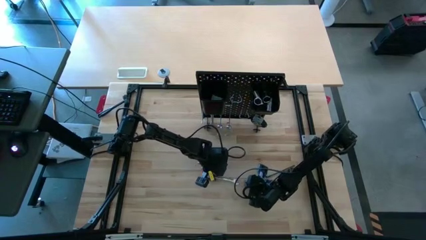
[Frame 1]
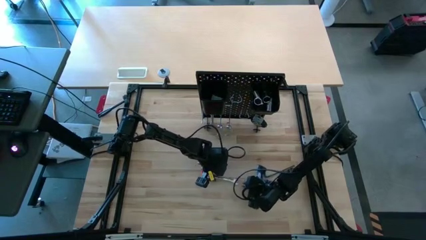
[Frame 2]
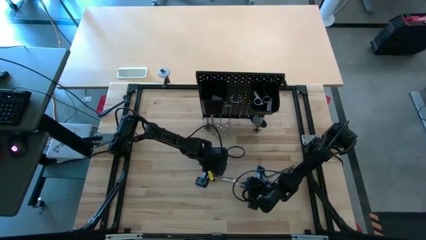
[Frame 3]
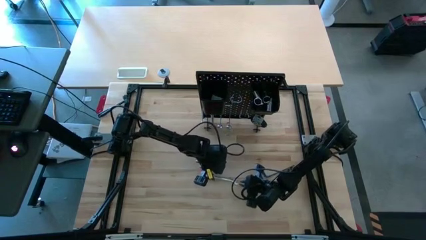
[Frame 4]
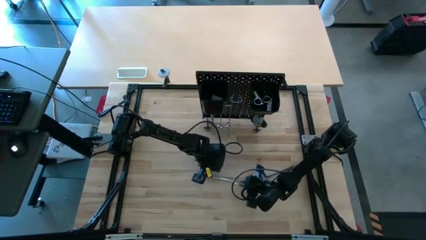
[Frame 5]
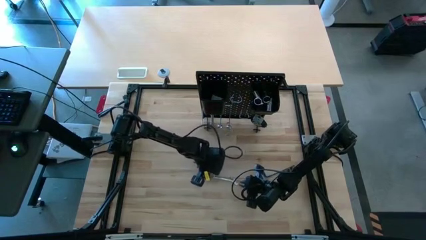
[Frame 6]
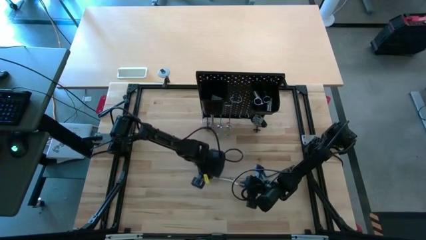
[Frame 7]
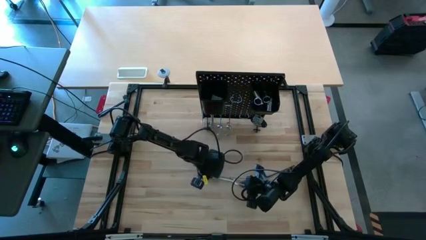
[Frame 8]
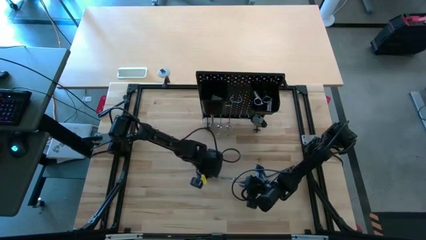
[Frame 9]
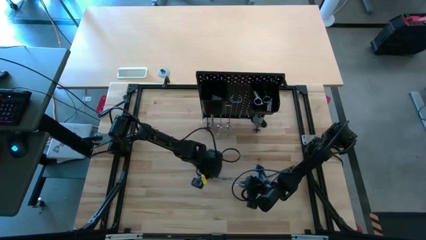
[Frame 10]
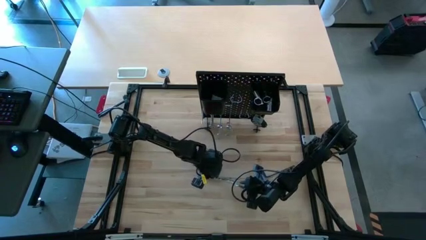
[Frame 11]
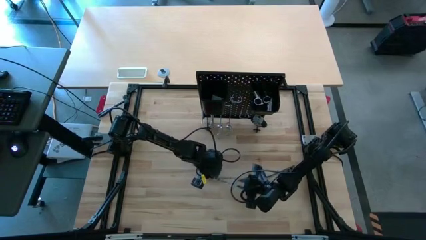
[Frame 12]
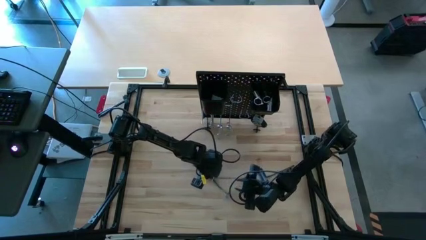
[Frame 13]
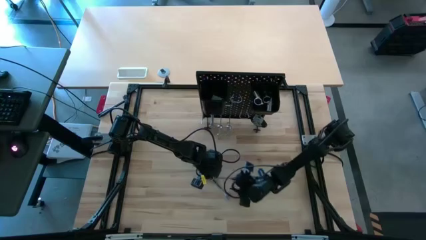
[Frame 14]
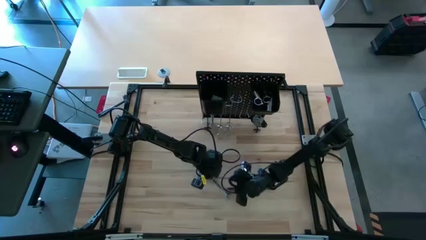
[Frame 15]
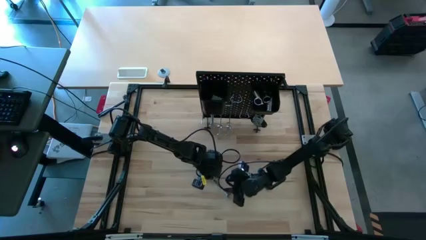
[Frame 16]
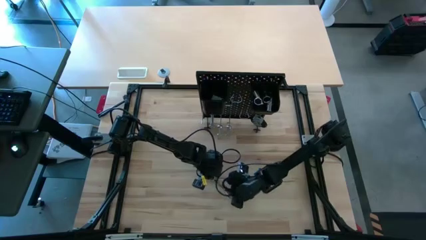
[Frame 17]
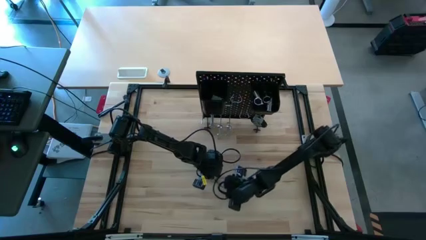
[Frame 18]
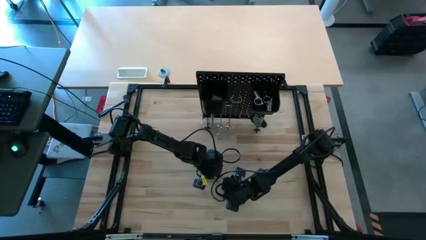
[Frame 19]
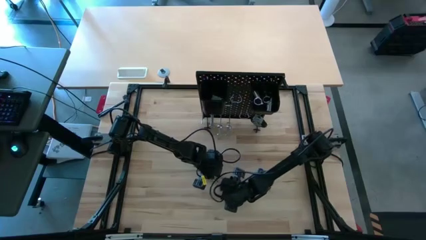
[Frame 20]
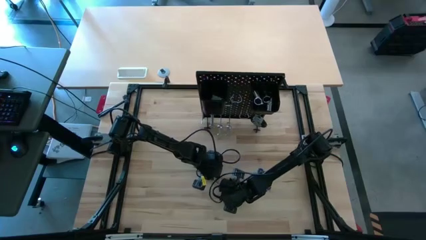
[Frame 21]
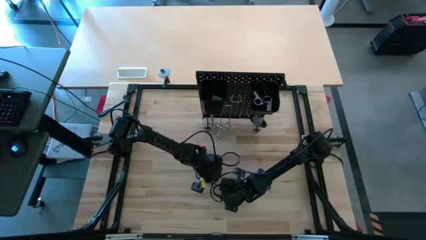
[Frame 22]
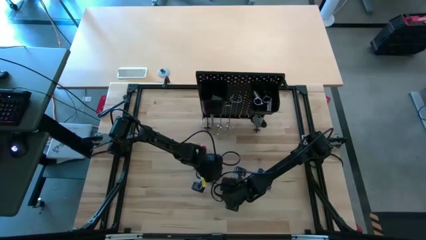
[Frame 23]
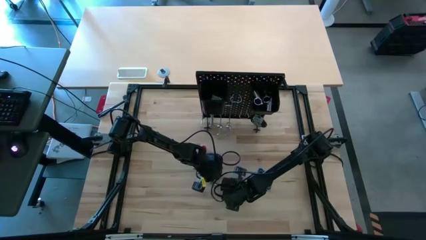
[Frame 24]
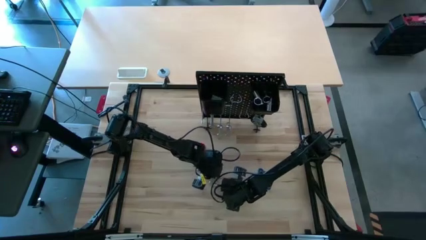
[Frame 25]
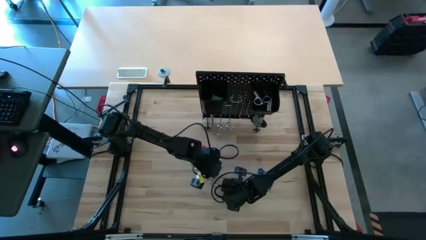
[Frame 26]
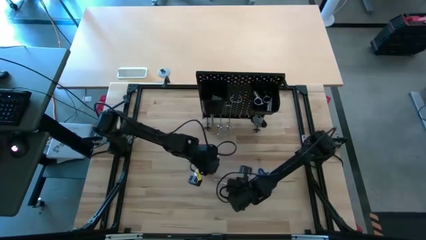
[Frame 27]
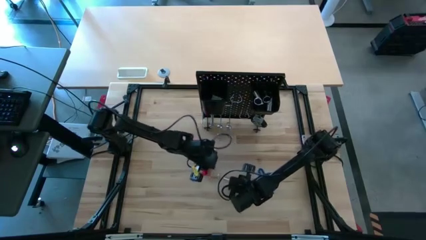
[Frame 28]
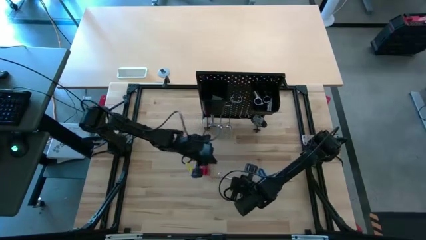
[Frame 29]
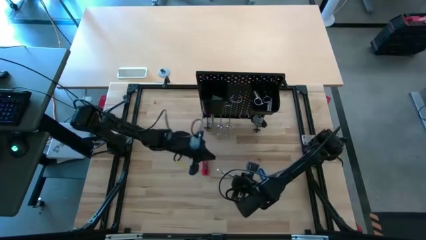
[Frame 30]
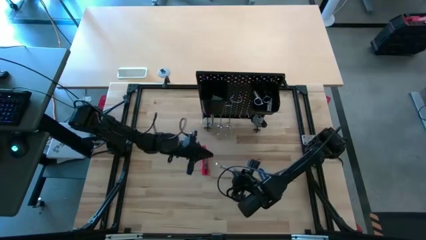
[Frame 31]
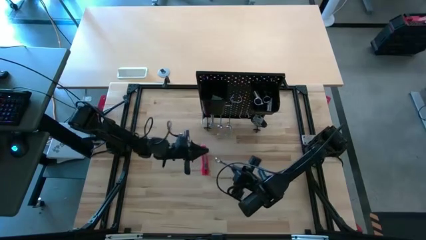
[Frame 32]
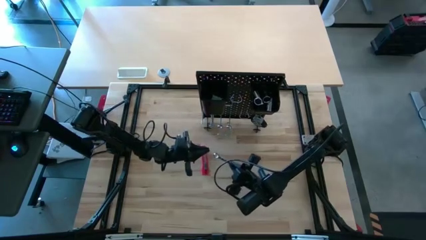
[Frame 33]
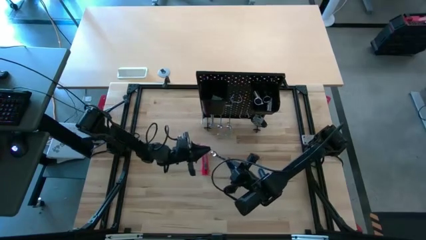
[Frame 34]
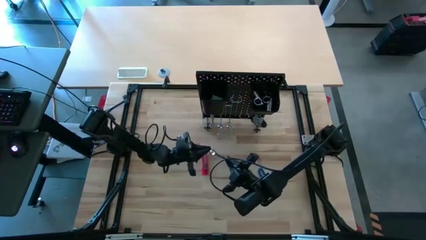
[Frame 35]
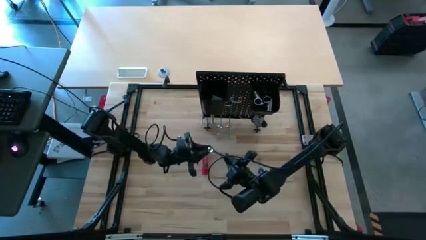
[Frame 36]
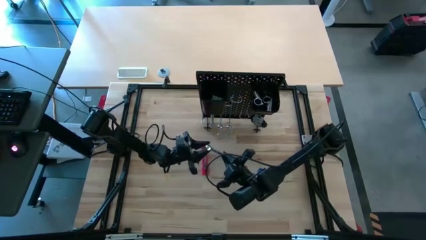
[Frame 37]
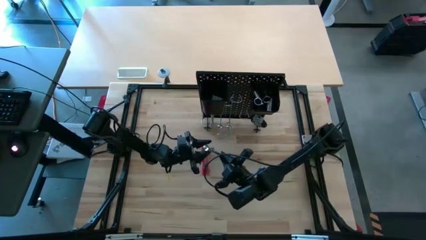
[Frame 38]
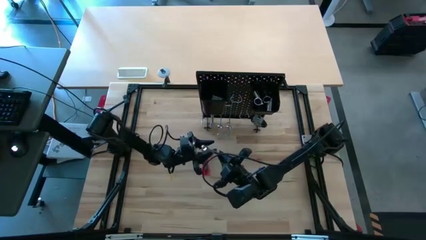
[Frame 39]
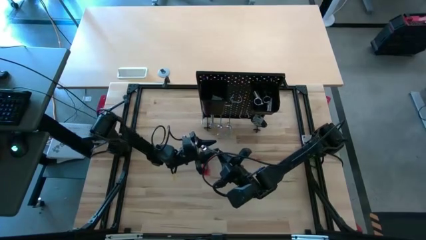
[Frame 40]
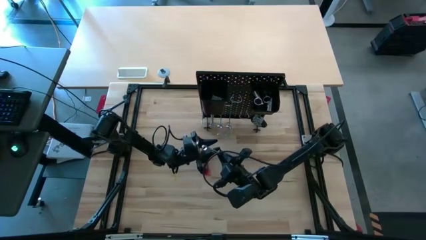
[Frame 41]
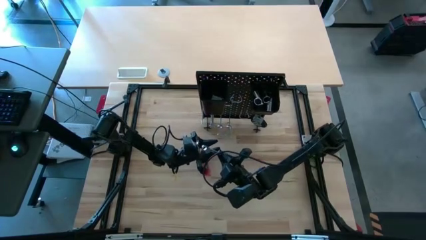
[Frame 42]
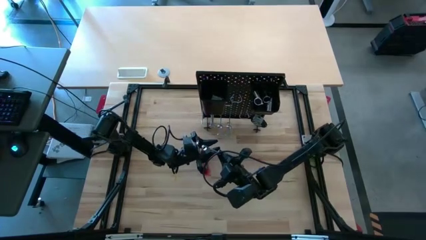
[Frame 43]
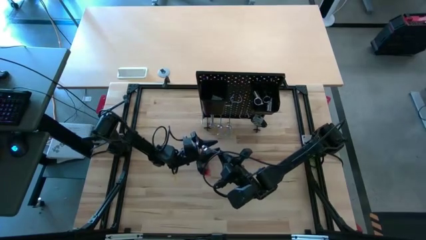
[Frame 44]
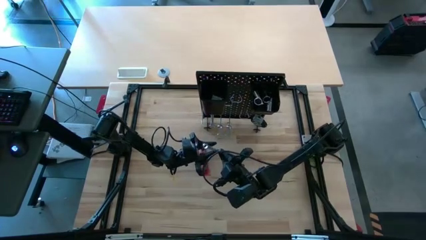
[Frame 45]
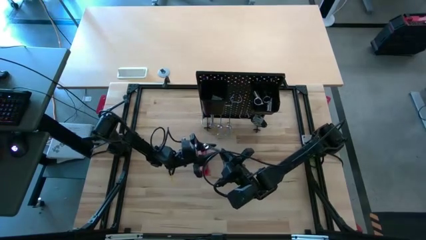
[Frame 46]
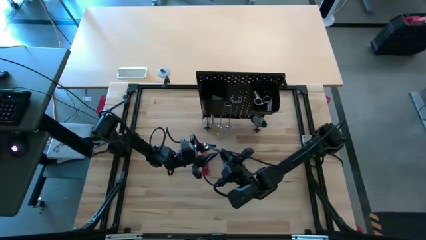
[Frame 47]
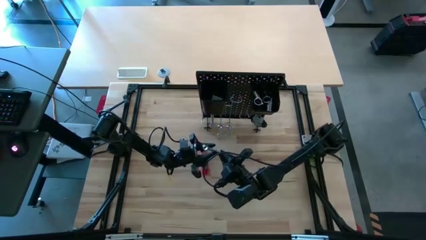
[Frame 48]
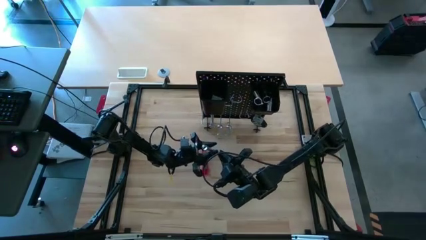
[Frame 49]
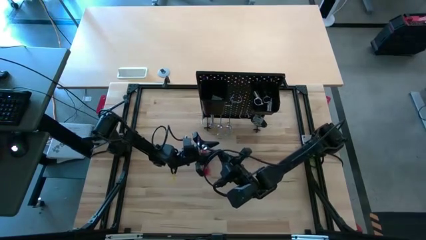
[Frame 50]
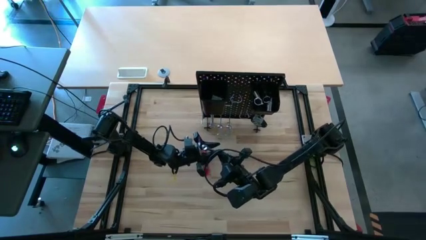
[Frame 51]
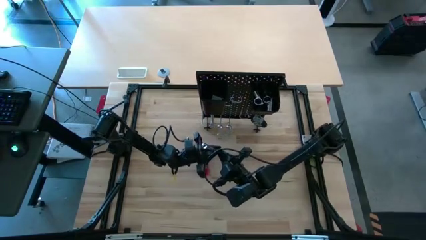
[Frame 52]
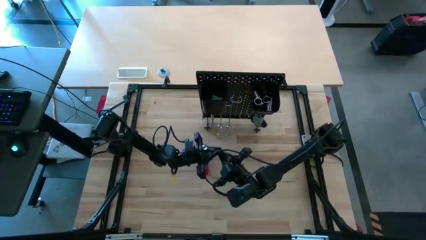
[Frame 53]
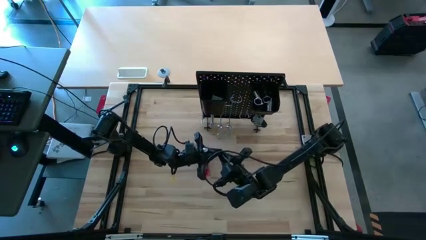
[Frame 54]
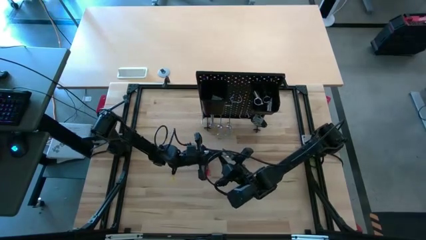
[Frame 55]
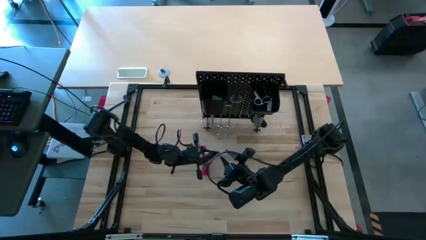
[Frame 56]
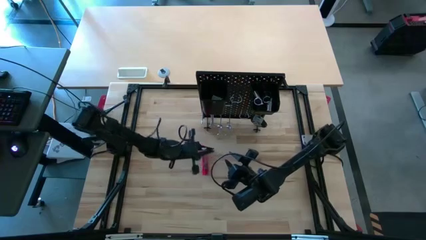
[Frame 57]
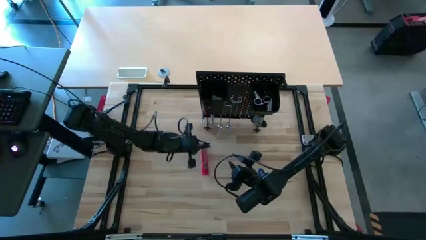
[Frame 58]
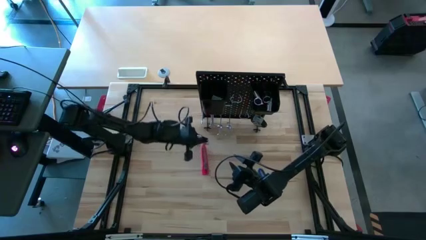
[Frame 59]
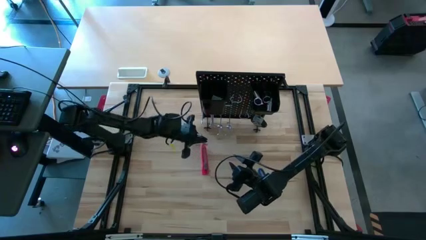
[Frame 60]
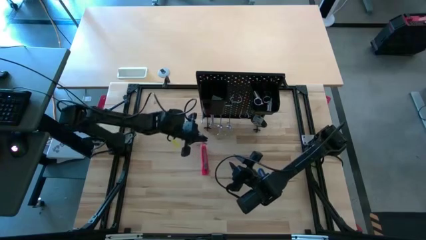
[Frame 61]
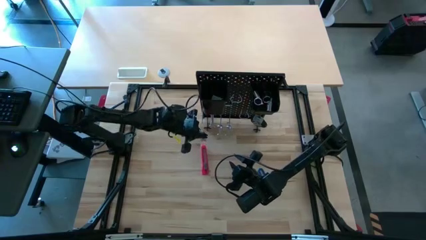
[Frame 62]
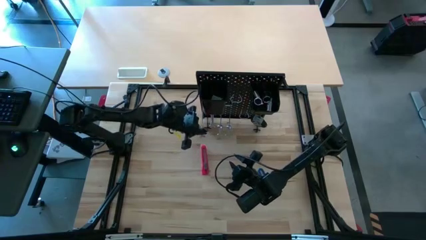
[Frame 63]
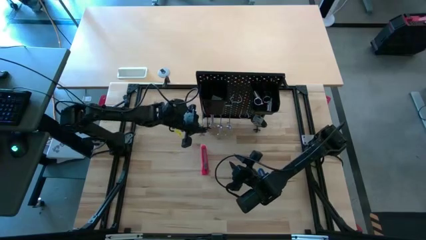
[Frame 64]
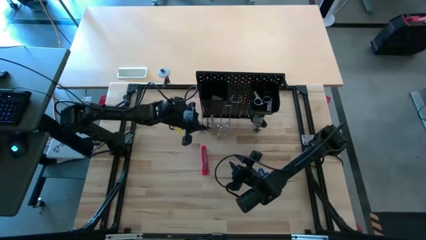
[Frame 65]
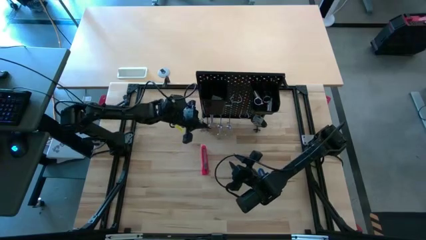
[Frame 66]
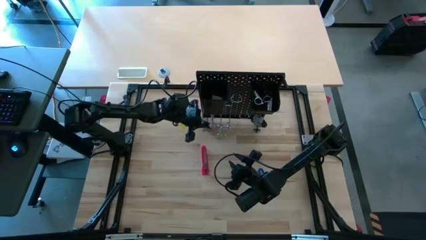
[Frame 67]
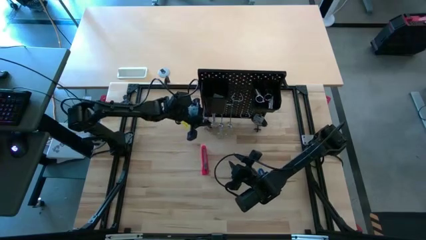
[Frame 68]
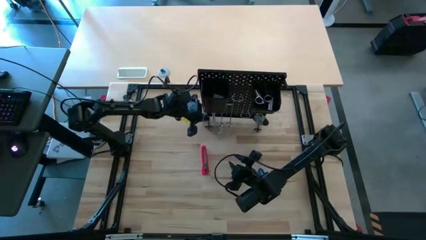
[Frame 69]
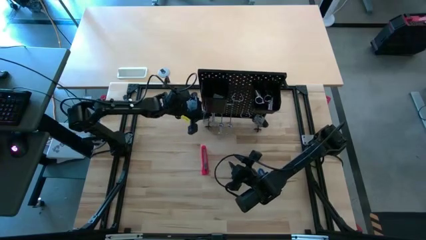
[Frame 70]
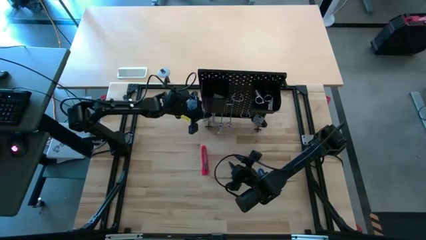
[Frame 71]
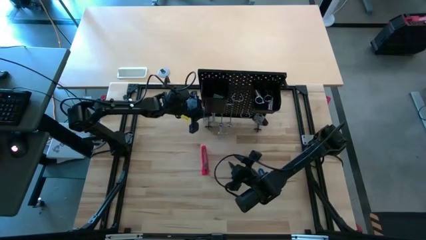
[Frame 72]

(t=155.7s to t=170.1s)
Task: Hang tools onto peg board
Hang the wrench on the peg board

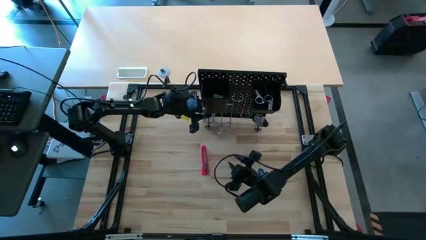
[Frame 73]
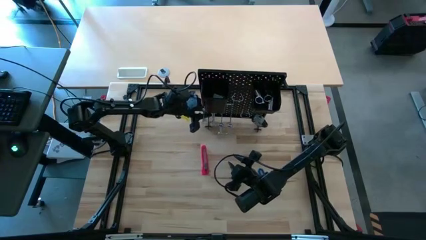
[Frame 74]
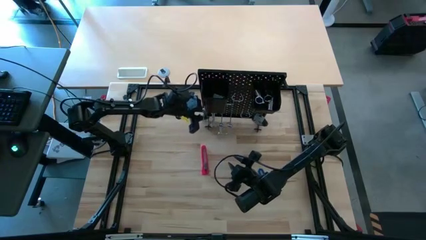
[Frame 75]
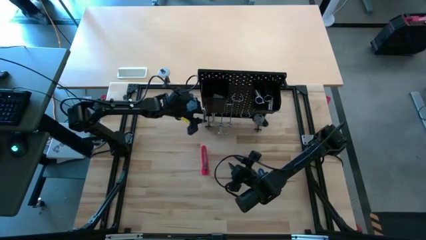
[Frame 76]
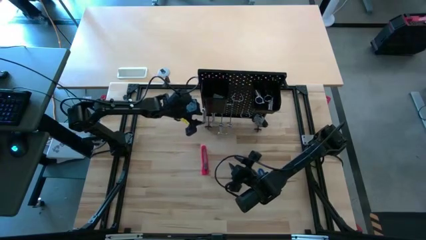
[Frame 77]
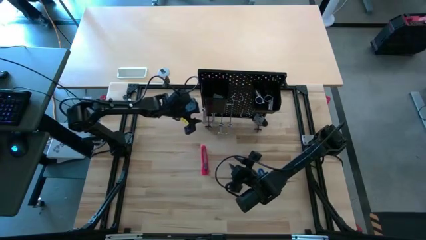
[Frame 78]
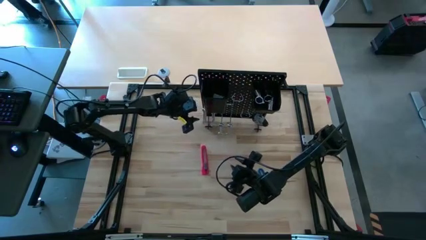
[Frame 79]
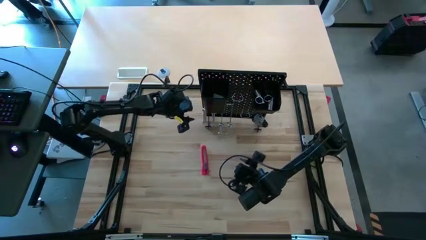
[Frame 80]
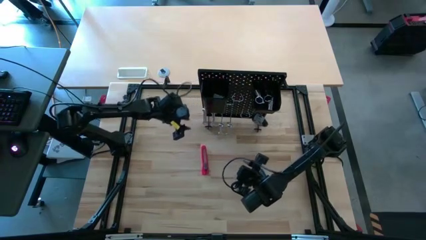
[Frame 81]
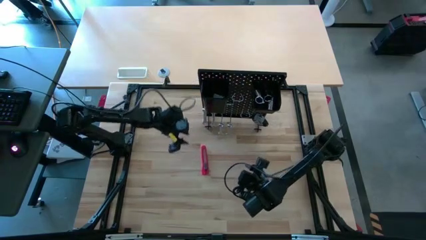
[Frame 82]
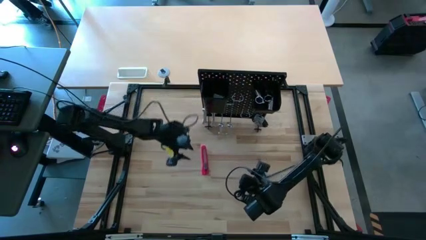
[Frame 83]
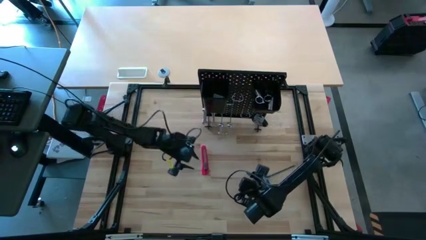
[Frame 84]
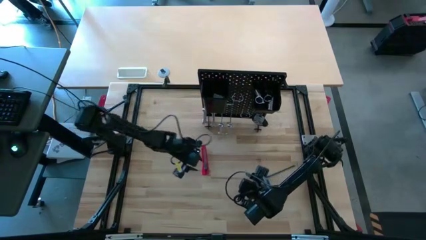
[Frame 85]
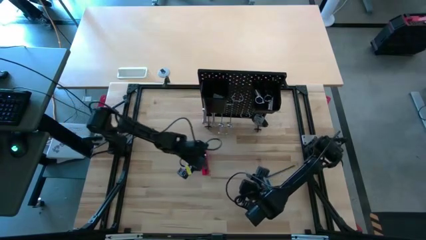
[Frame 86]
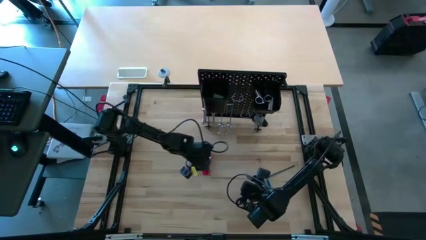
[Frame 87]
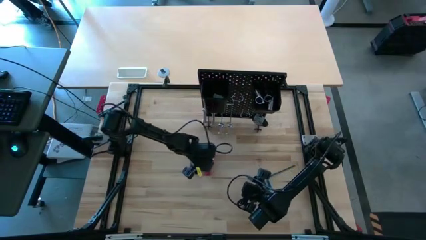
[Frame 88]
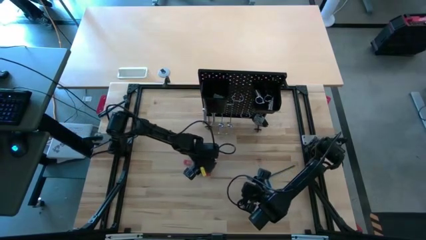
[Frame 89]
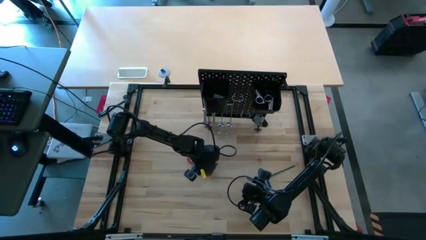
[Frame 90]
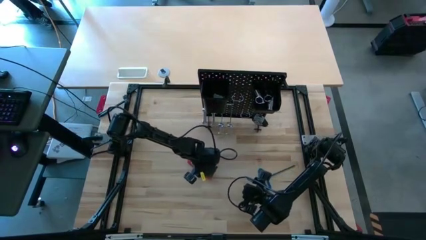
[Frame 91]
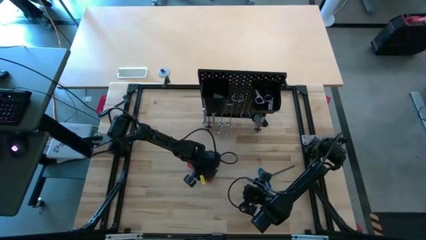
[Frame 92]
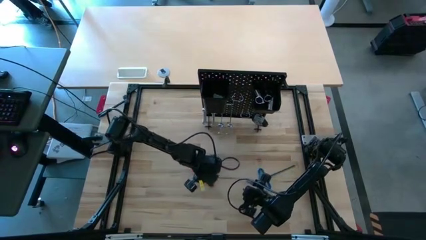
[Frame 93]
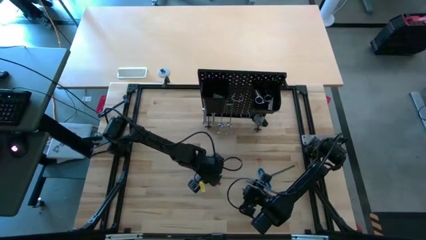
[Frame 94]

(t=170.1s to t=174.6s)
Put the cutter into the peg board
